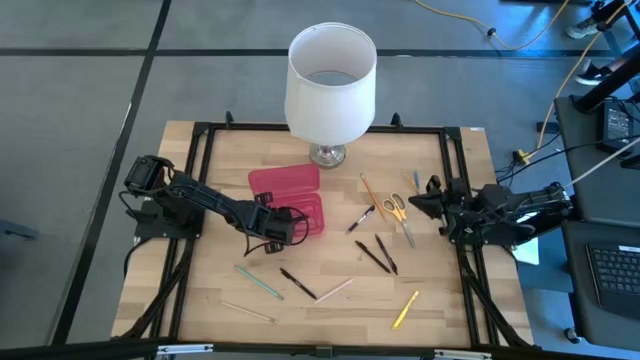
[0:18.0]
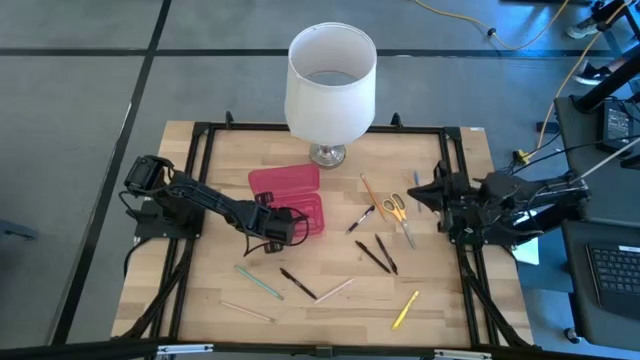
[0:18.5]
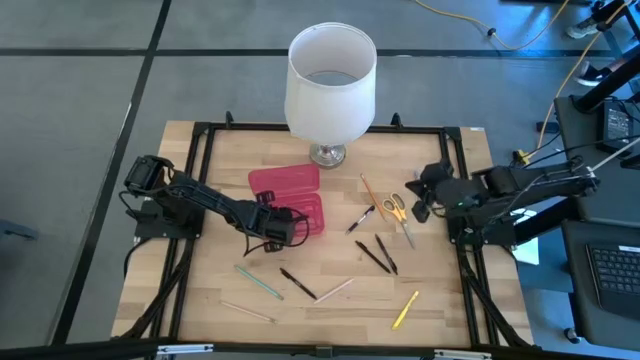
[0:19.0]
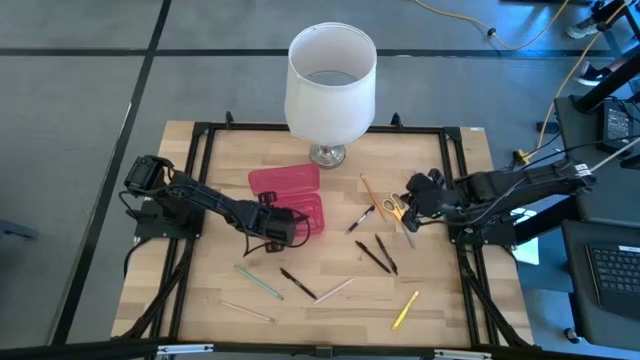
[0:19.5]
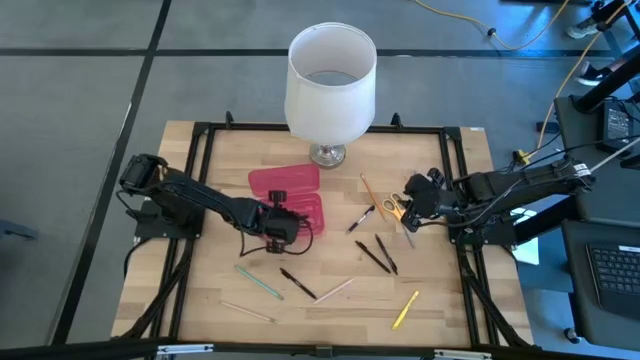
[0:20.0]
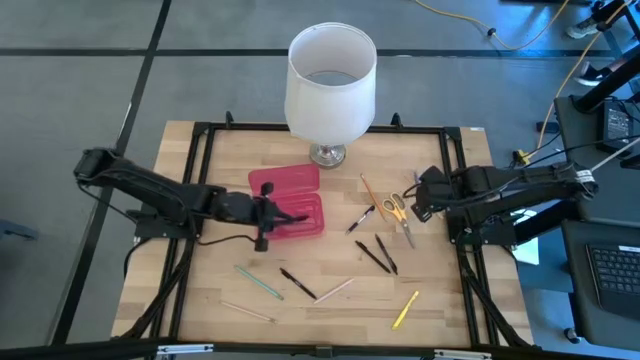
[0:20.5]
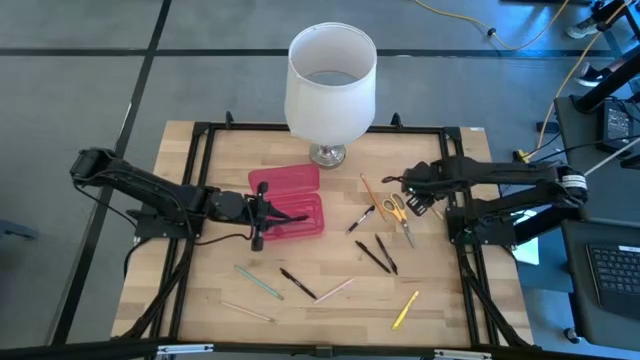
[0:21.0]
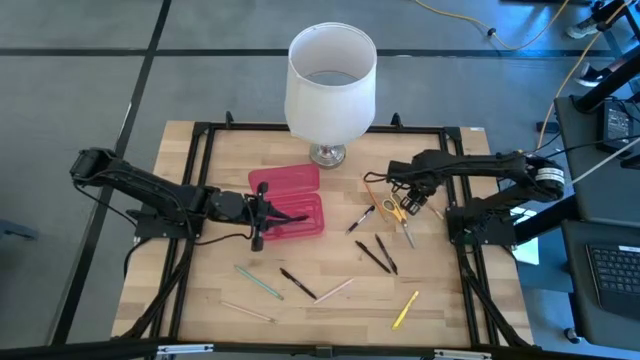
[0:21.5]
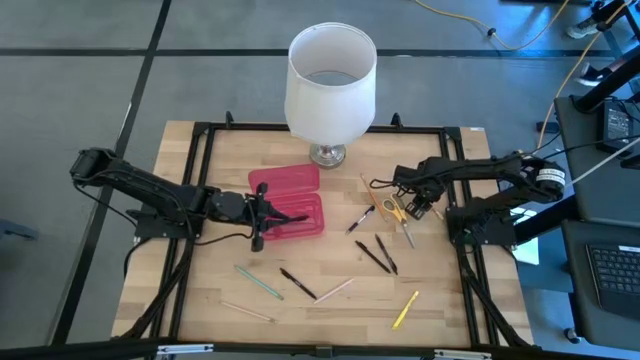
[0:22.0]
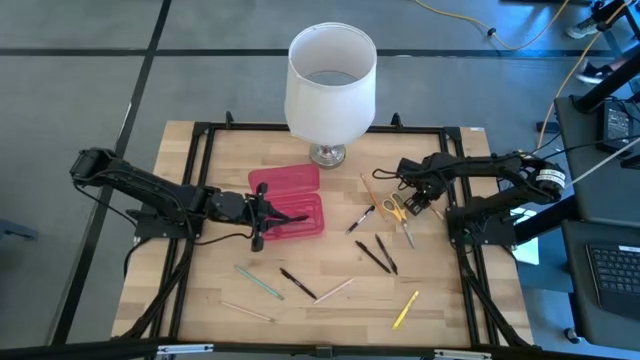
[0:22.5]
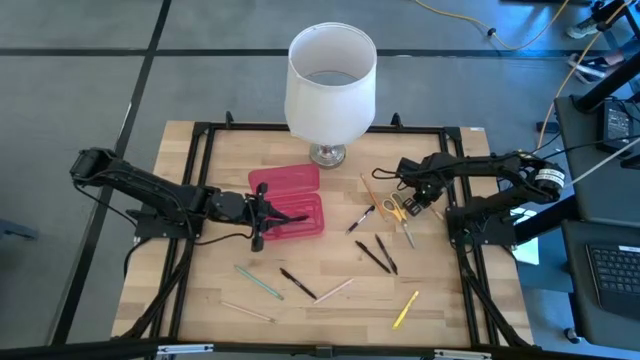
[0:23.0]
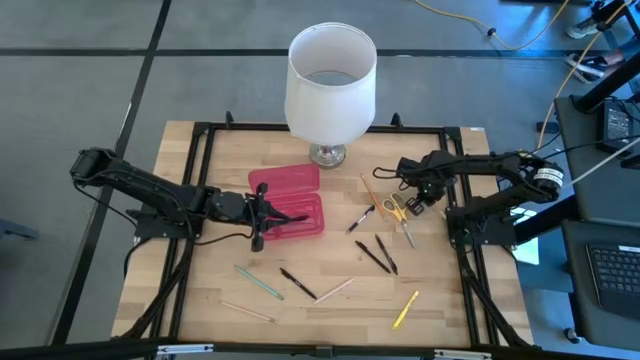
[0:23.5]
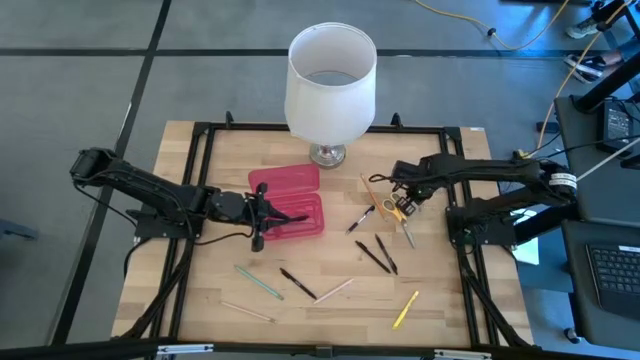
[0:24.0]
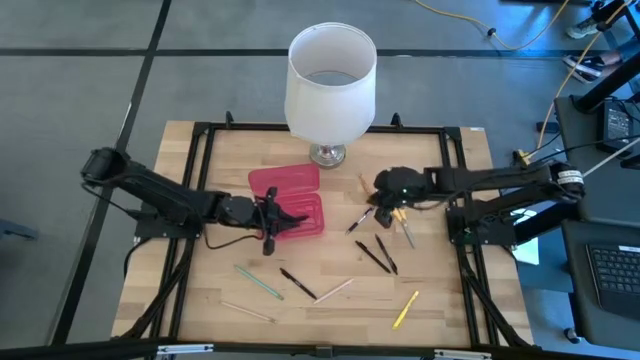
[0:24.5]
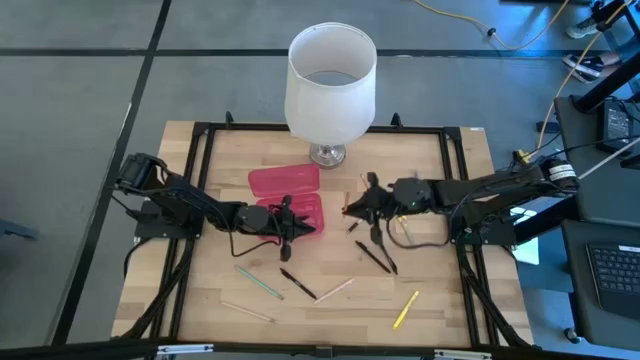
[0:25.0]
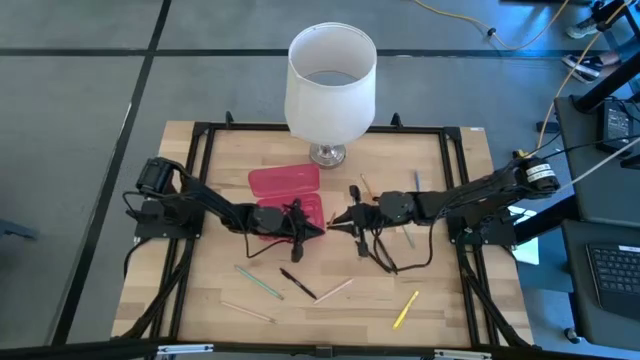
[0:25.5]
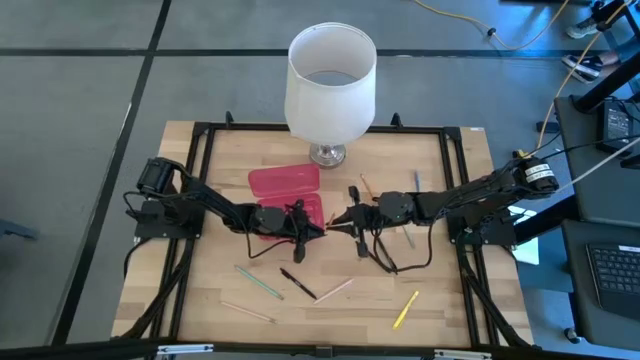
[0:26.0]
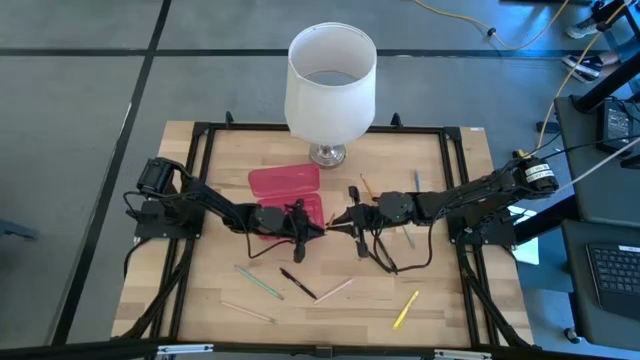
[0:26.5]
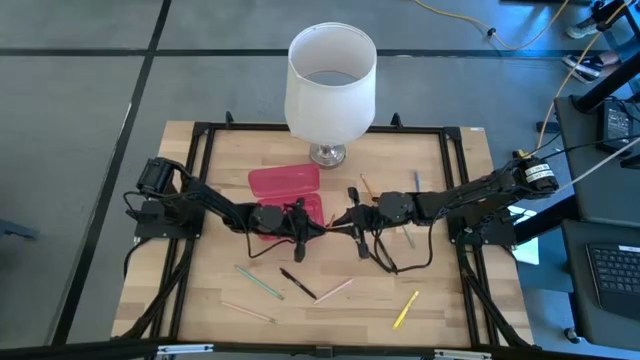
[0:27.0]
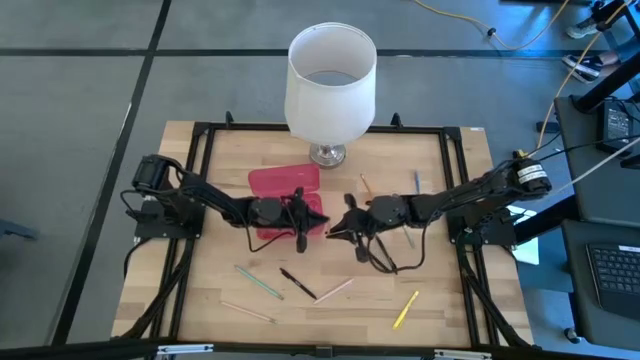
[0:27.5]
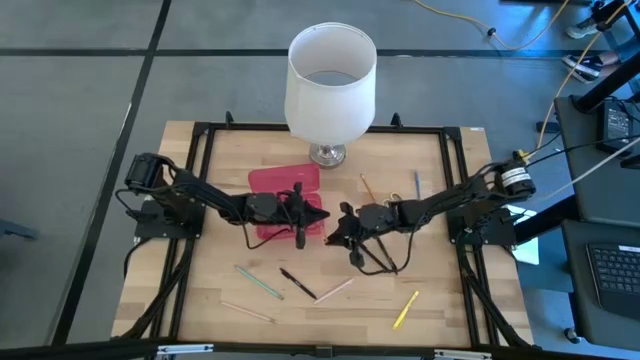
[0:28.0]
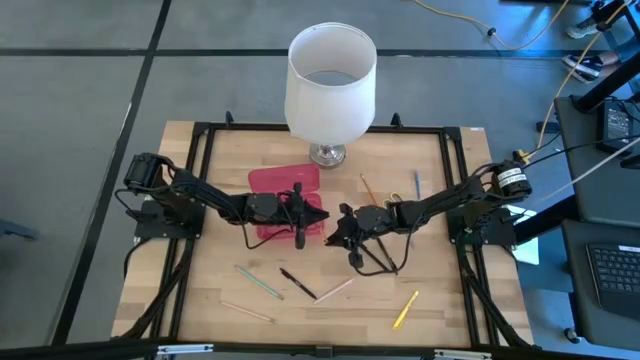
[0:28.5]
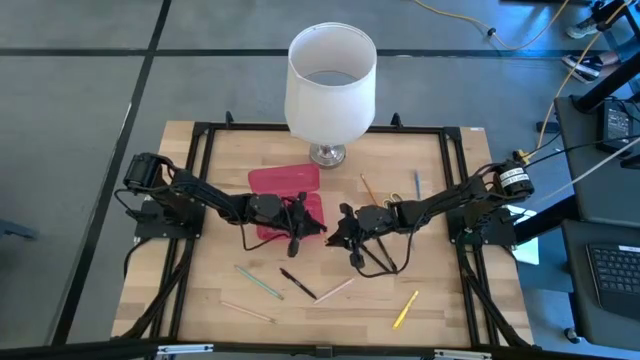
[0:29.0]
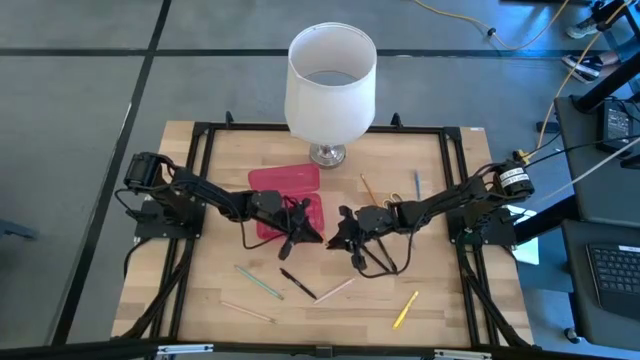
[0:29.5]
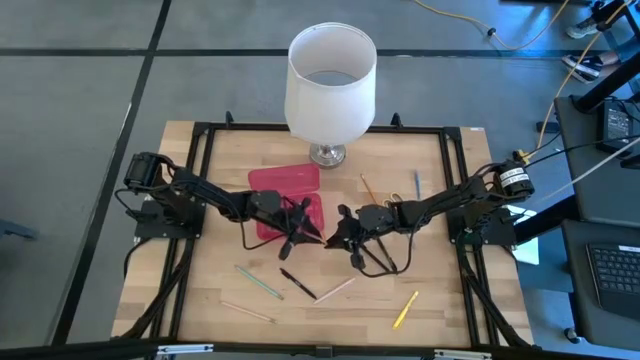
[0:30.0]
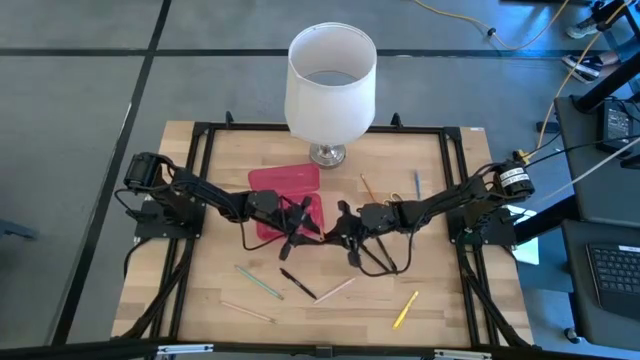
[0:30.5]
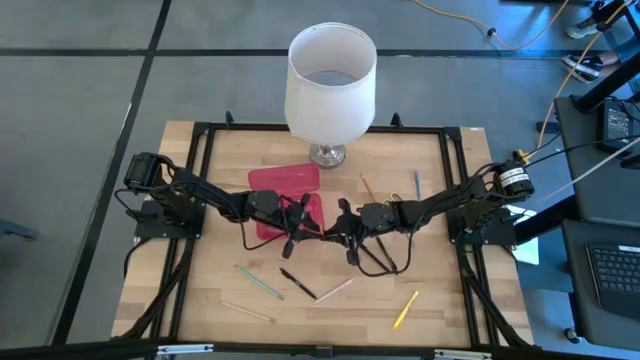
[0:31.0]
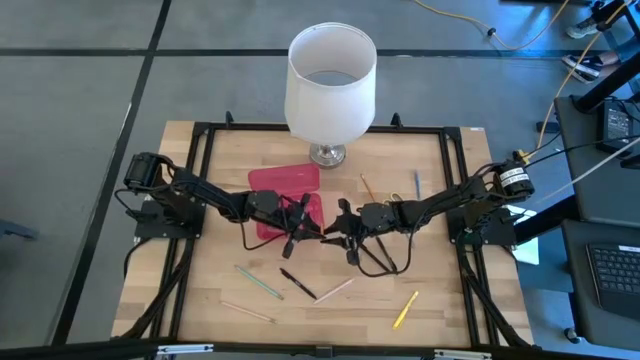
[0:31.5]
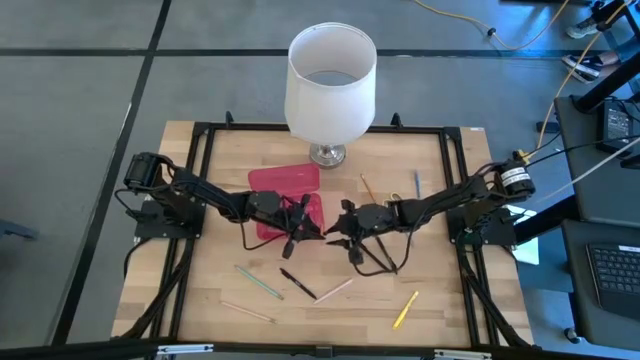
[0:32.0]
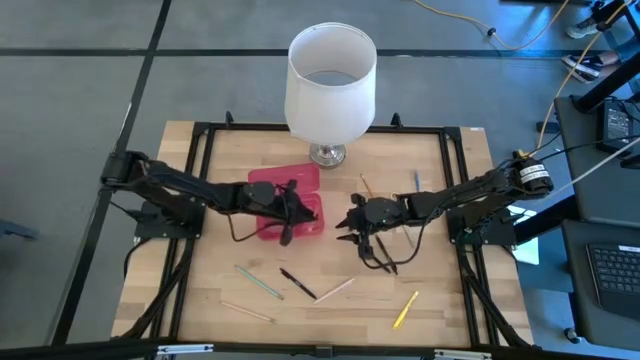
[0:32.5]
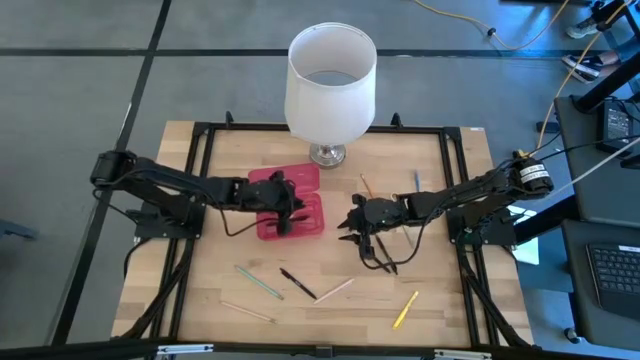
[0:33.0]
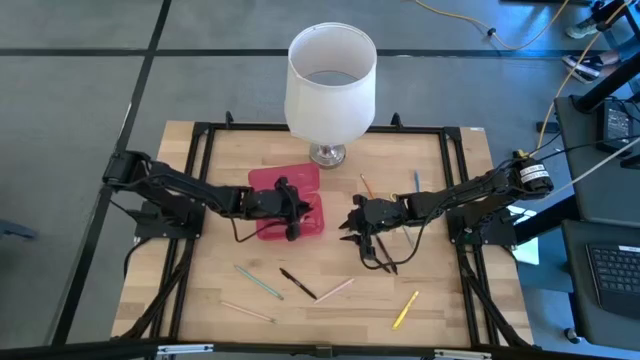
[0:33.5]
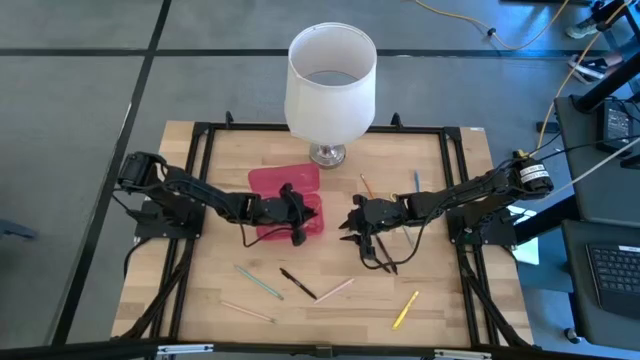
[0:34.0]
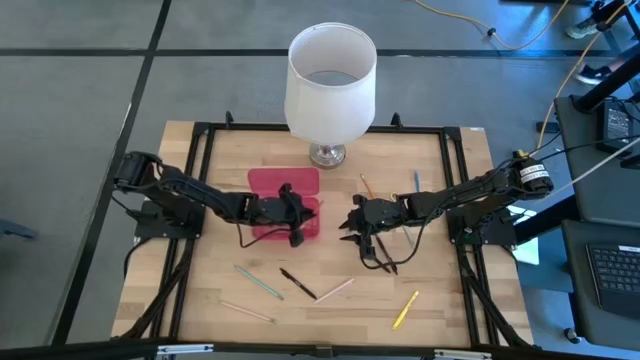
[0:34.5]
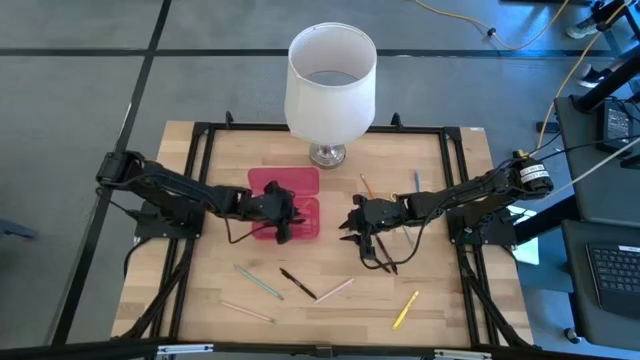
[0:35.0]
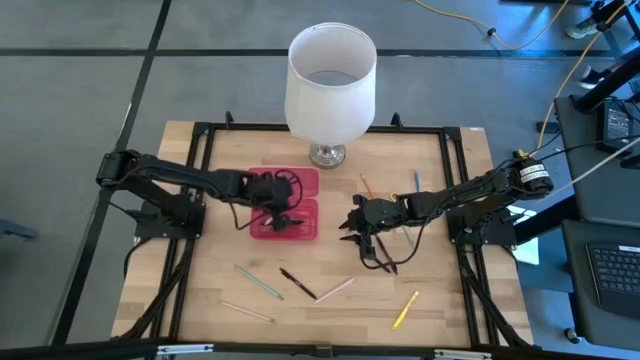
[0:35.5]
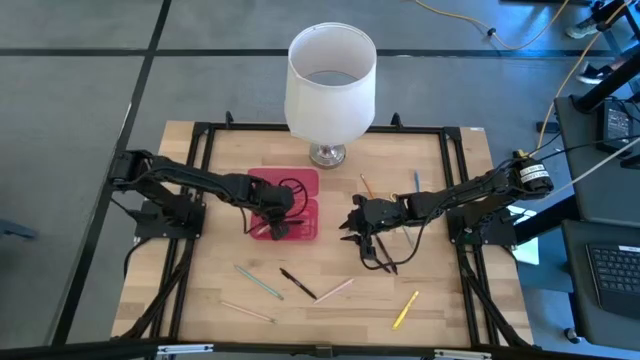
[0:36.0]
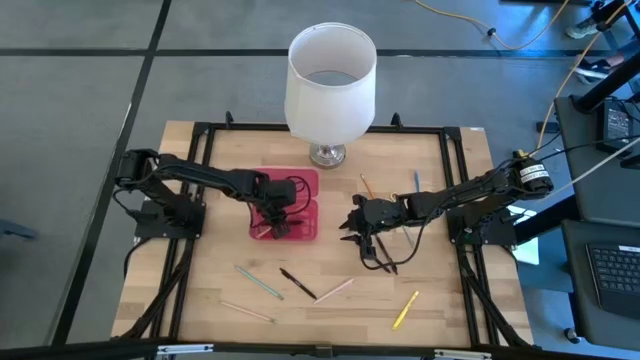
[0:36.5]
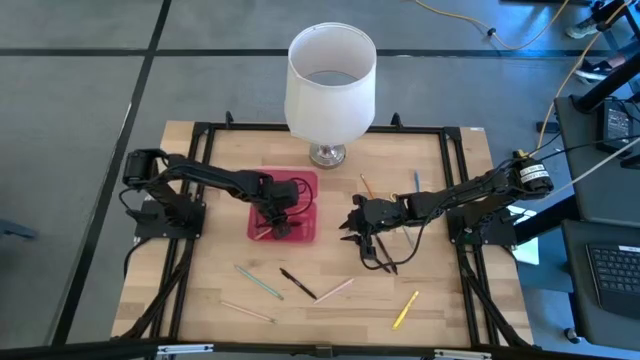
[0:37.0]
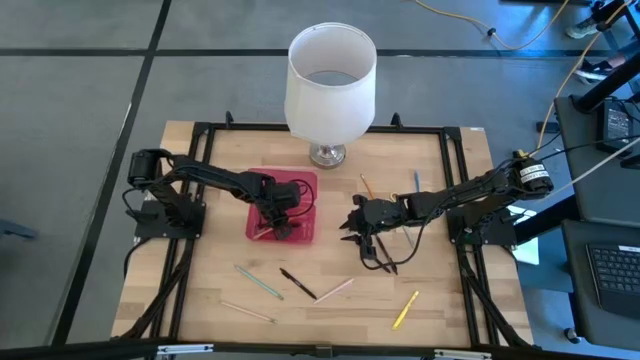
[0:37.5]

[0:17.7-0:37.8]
Task: Pick & place school supplies into a supply box
Put the right yellow pencil into the red supply box
